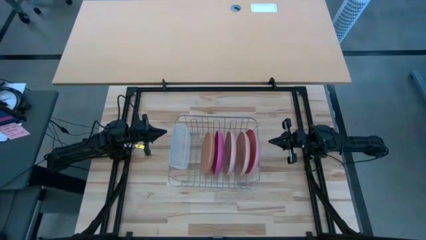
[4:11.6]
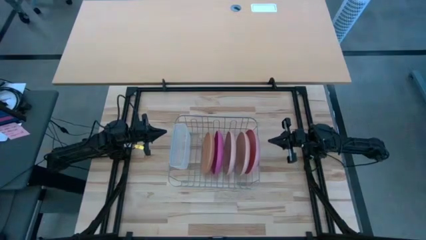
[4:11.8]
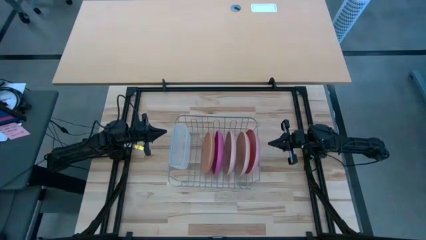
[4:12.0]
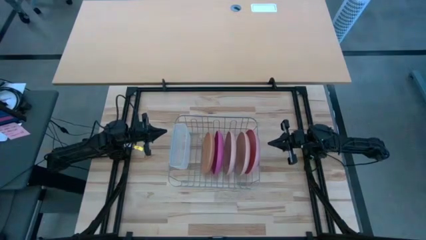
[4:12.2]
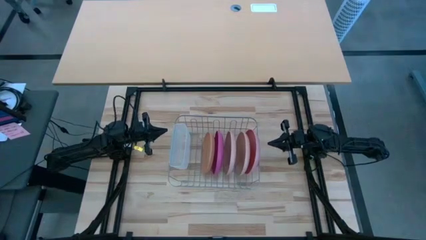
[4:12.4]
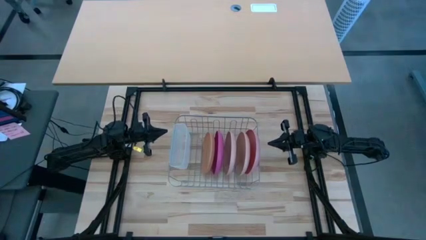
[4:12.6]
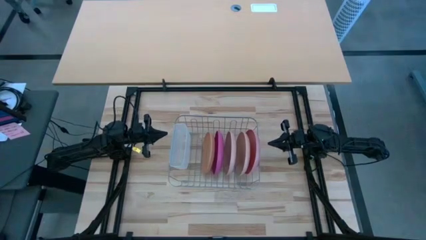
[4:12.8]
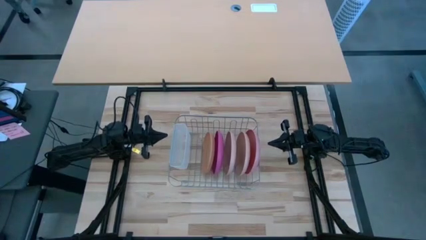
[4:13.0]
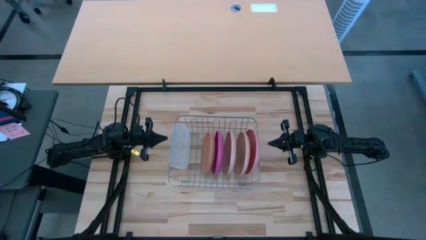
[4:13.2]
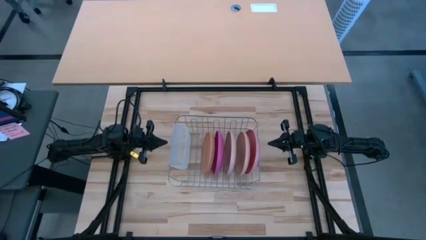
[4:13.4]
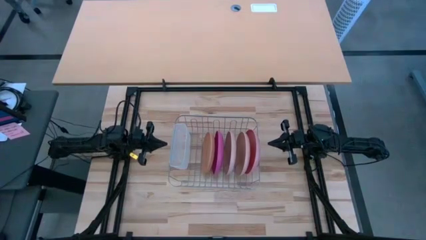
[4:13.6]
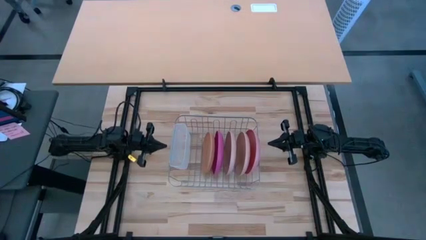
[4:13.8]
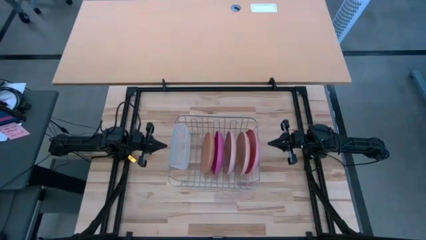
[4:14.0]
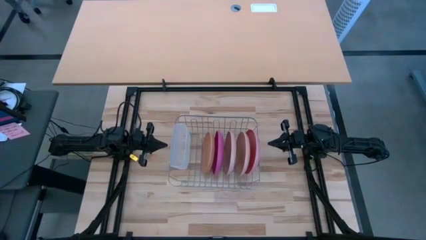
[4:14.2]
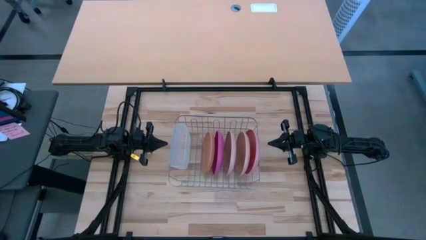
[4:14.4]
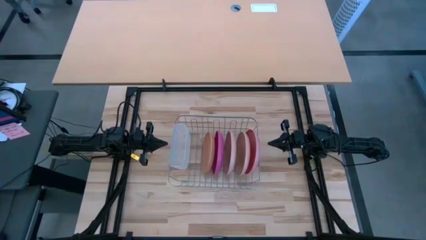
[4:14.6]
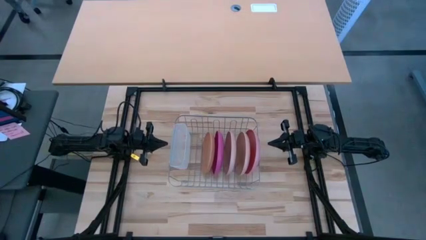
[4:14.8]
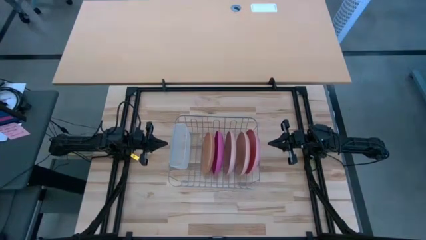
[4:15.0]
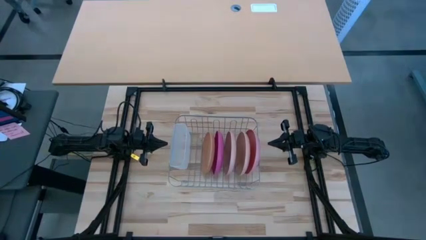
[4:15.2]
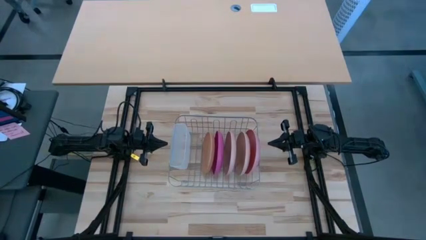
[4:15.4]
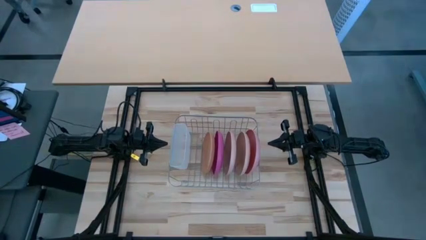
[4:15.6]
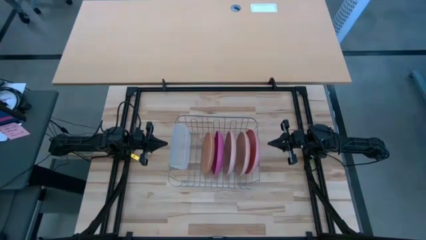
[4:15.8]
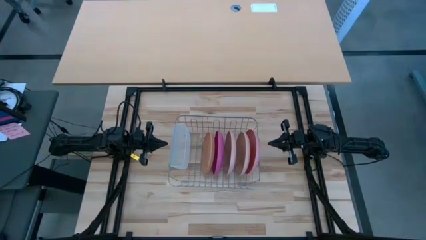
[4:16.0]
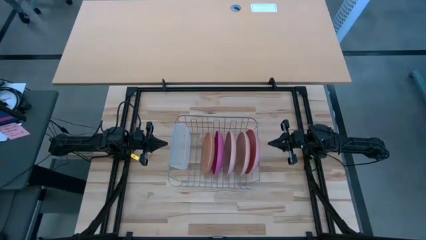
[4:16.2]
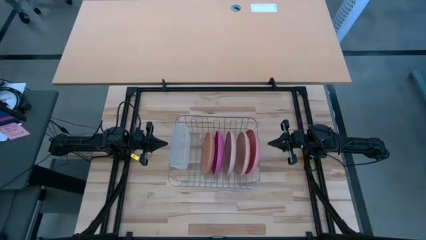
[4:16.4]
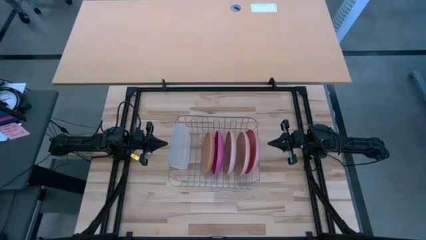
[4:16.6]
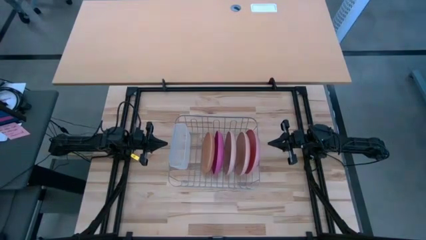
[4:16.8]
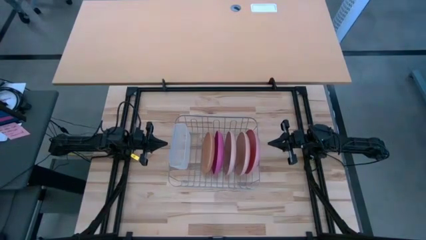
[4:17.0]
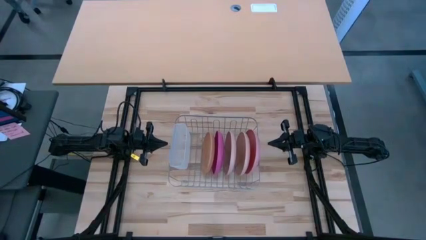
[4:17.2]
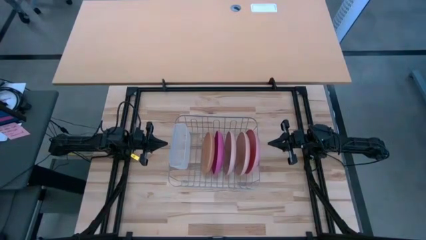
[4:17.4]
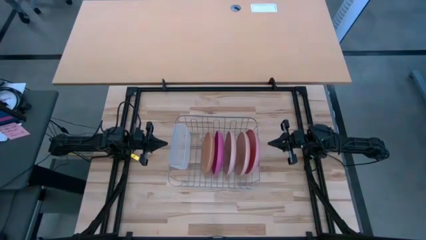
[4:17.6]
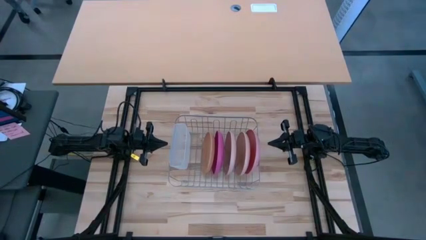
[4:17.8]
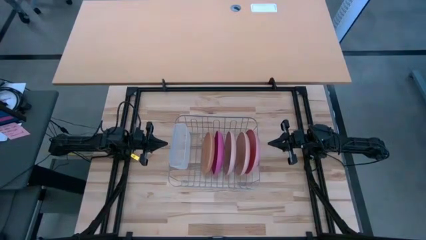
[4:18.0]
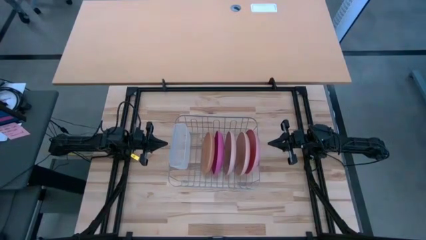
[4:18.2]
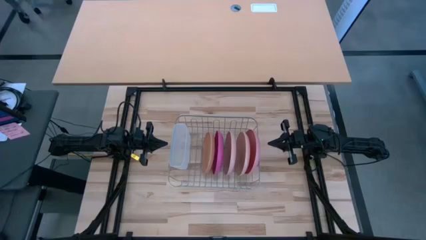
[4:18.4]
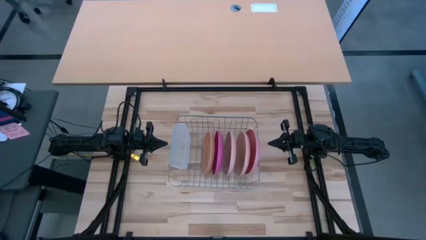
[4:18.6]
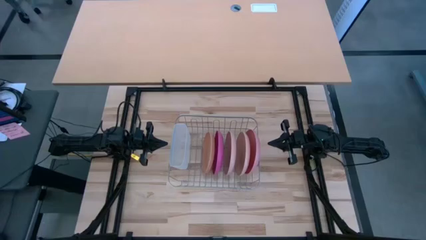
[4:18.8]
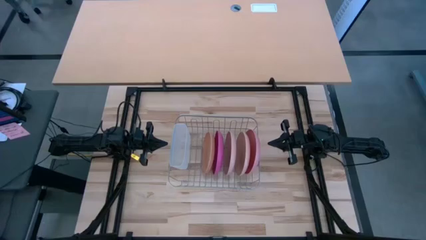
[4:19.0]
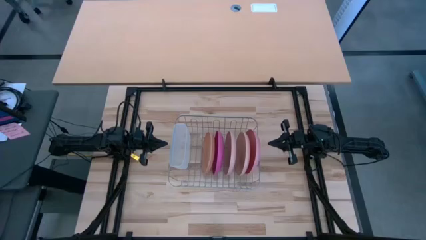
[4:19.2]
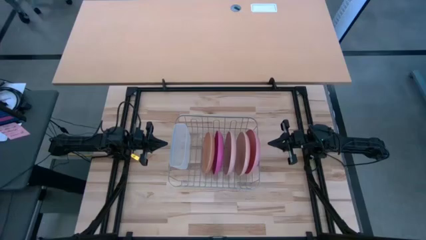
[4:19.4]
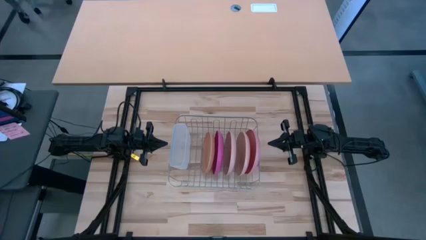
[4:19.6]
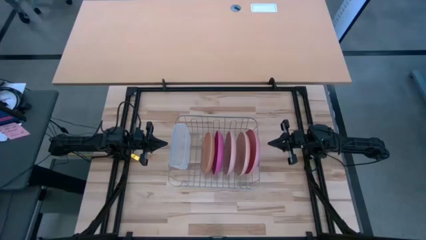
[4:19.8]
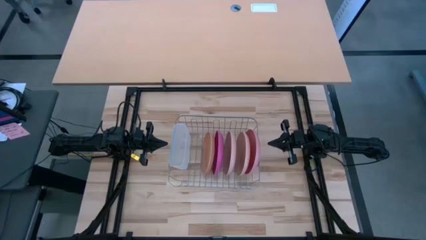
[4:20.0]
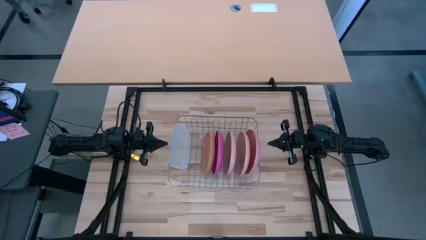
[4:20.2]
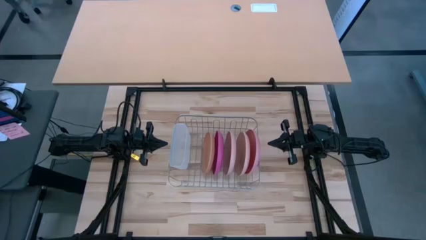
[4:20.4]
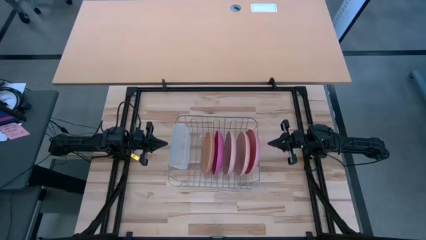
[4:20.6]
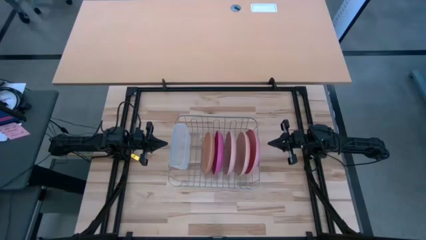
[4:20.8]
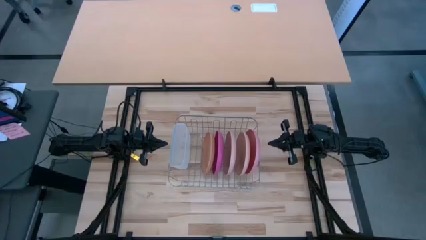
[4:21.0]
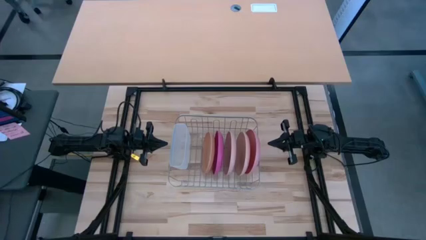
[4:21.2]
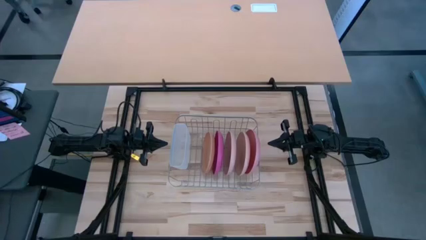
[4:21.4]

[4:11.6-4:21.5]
Task: Sort dishes
Return to Home Position

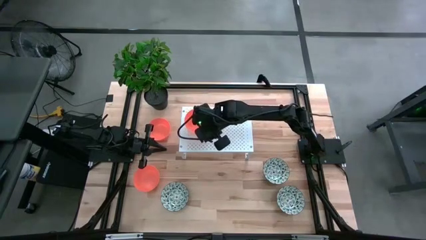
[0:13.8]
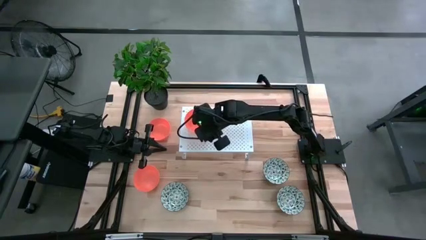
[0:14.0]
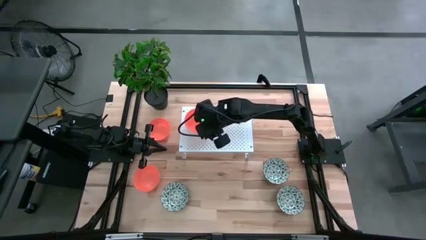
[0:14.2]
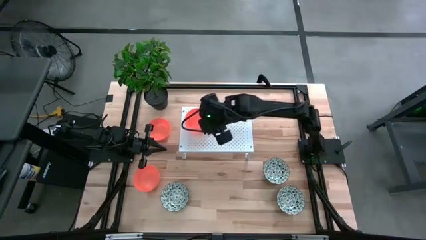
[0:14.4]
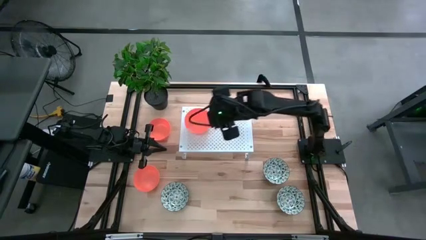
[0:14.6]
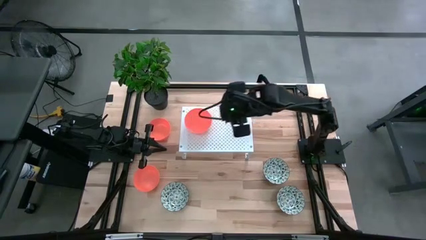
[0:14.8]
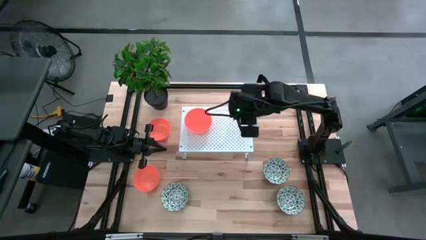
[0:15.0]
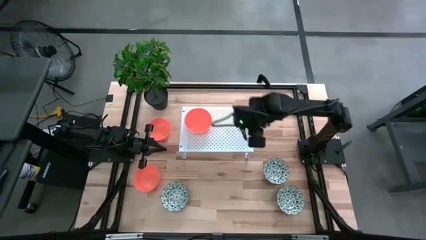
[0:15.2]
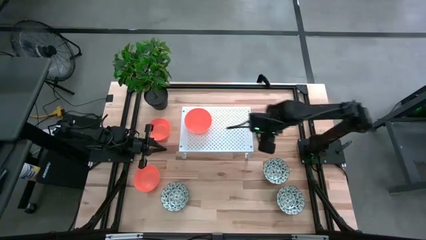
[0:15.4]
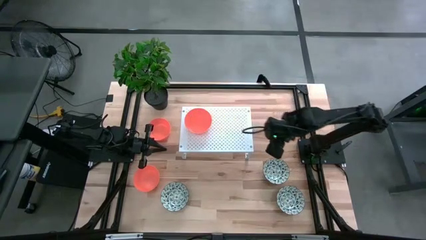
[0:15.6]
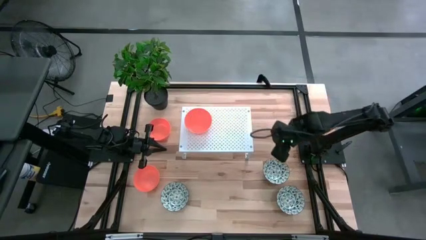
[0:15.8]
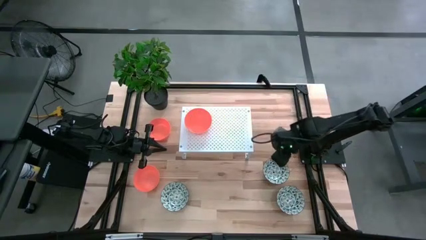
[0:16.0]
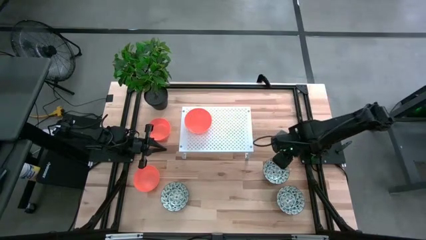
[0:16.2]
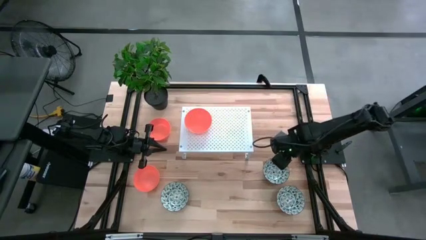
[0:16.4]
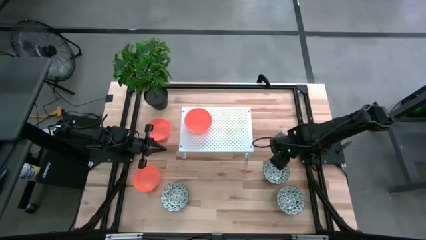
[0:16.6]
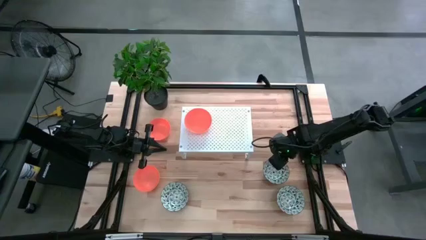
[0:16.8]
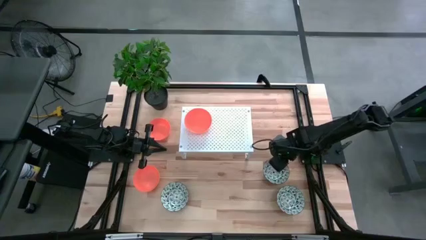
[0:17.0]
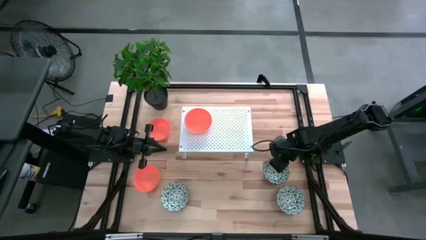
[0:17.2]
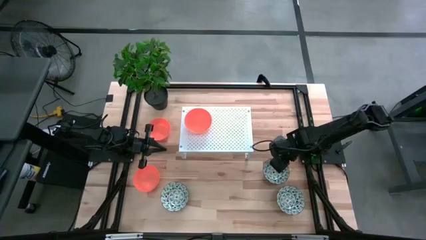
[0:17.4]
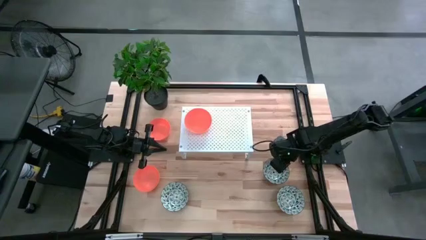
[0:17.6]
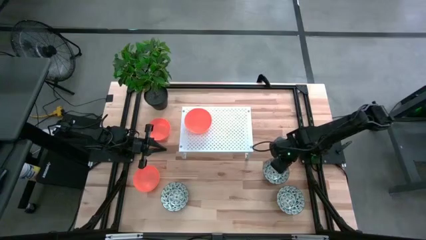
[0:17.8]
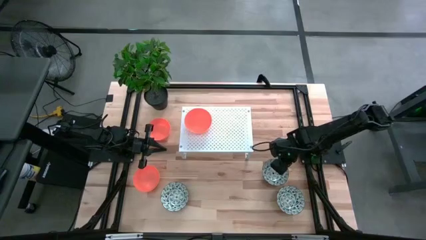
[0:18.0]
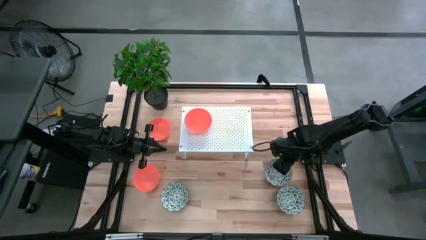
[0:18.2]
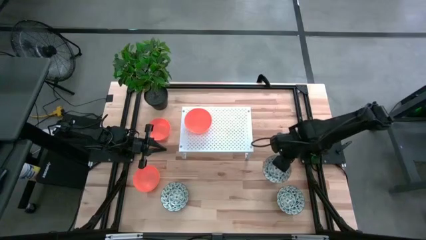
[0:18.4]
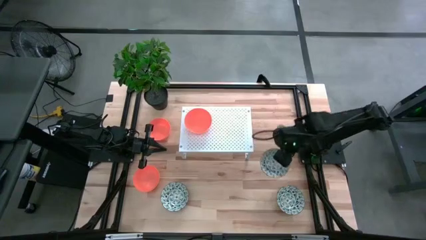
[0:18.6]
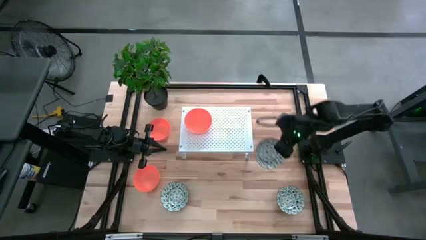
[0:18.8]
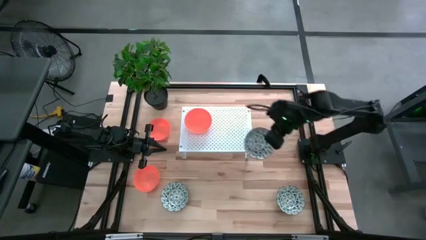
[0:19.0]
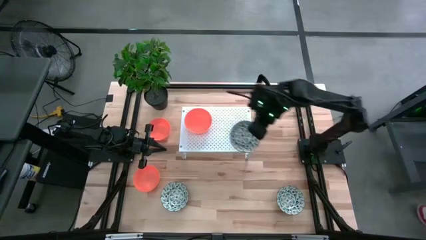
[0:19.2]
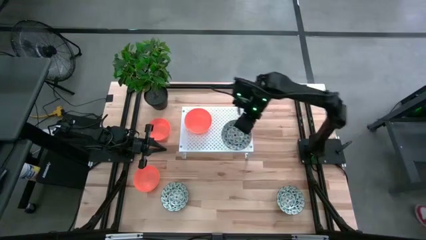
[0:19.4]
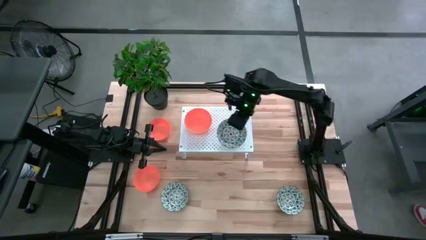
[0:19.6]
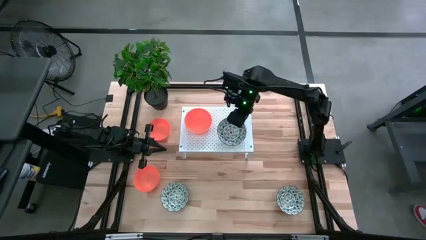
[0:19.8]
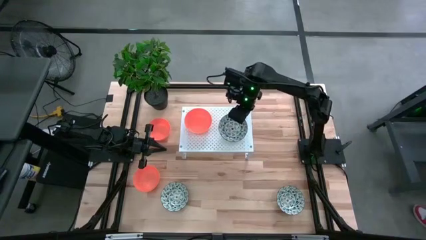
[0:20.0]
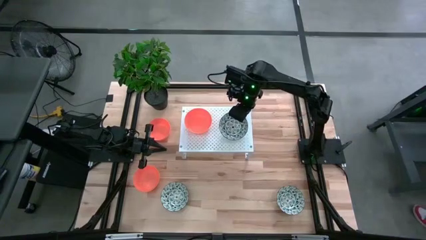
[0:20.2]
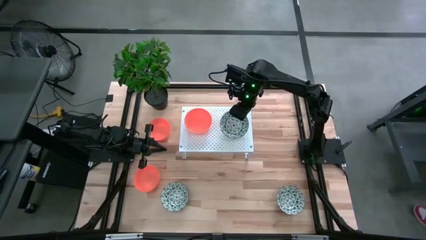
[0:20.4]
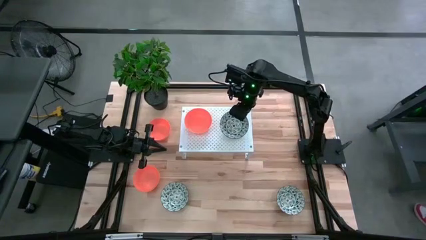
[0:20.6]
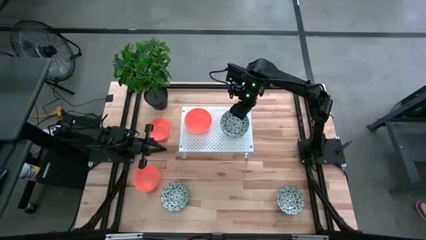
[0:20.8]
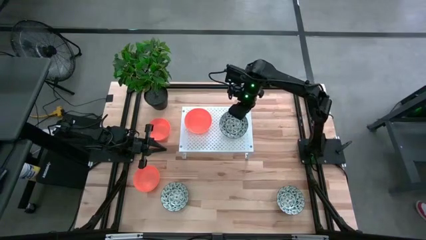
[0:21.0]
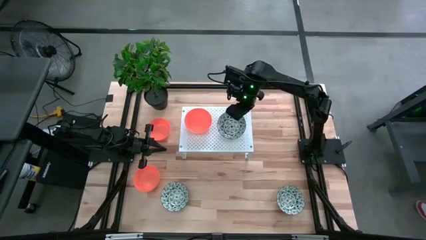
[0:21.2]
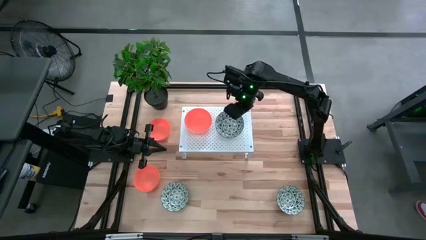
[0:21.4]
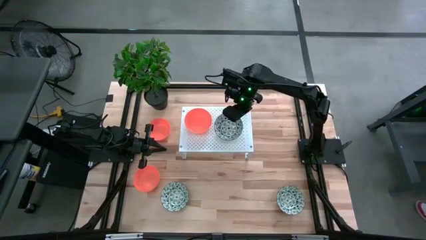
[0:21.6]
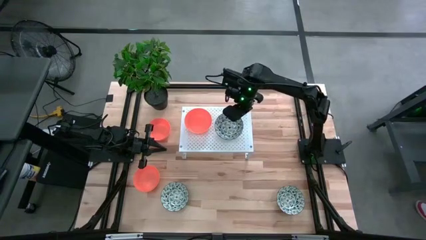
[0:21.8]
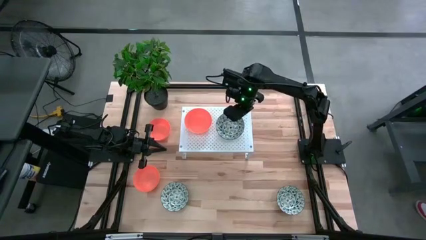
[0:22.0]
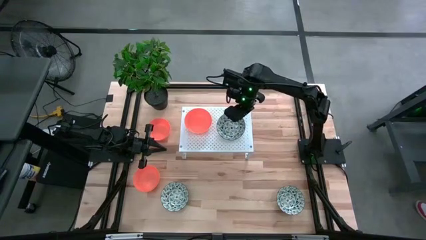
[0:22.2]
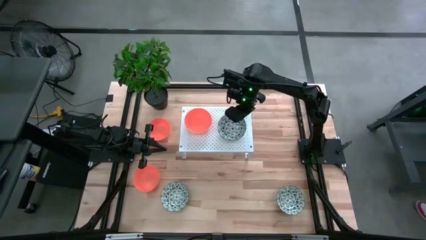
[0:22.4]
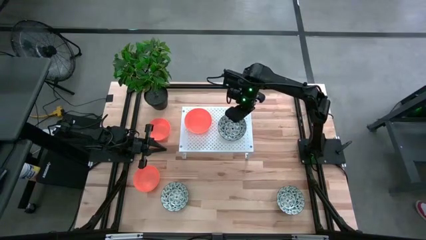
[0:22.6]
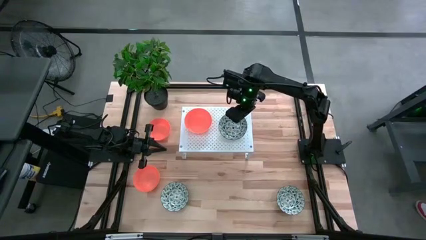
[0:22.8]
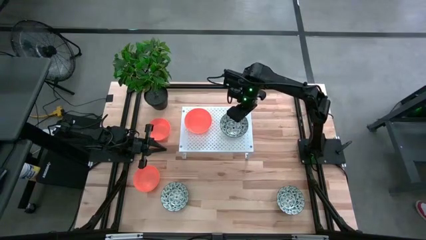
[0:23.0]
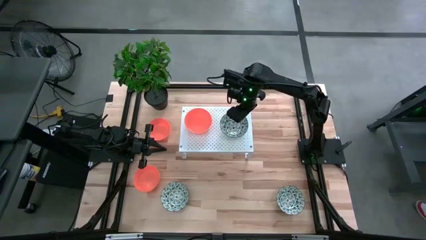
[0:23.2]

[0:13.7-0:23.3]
Task: Pick & Place Mini bowls
Put the top blue patterned bowl on the shelf
